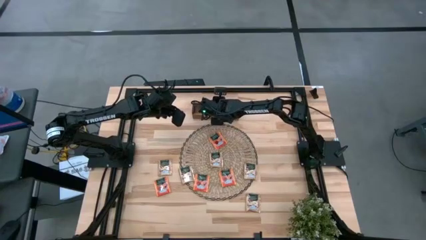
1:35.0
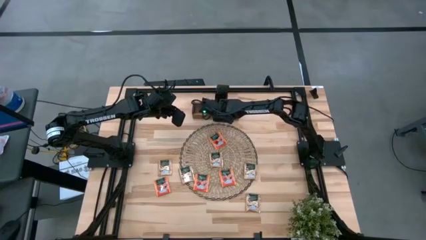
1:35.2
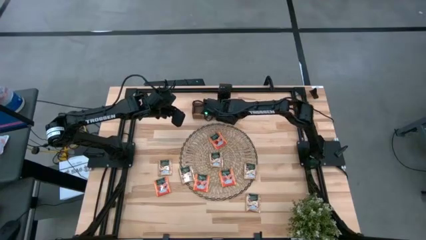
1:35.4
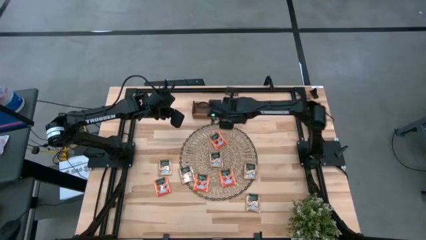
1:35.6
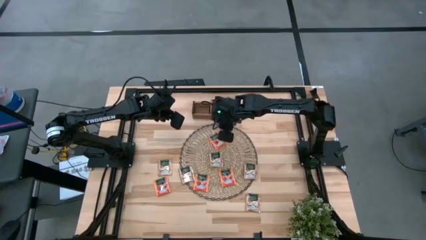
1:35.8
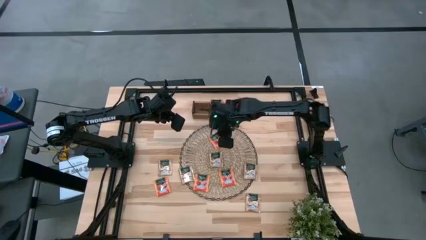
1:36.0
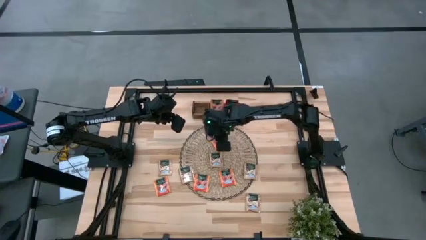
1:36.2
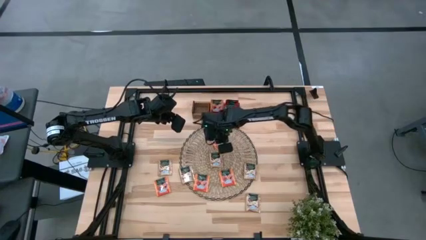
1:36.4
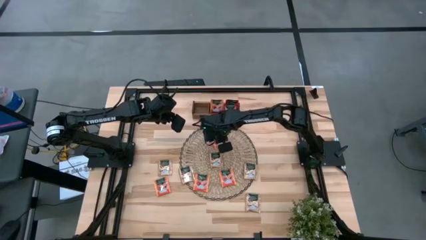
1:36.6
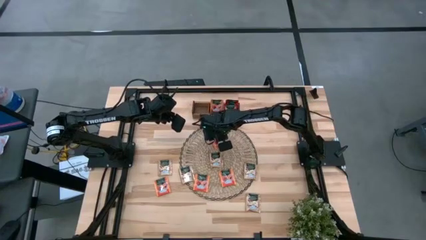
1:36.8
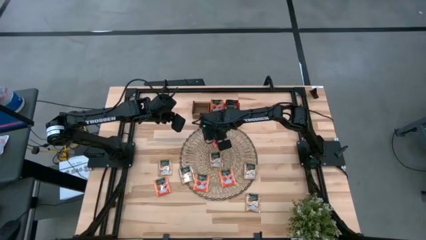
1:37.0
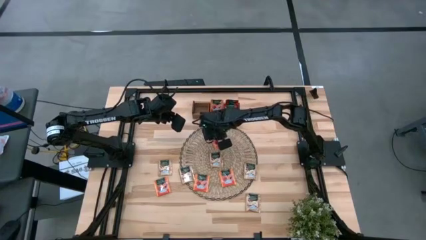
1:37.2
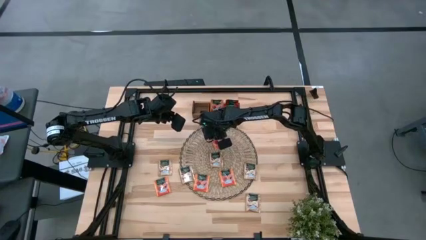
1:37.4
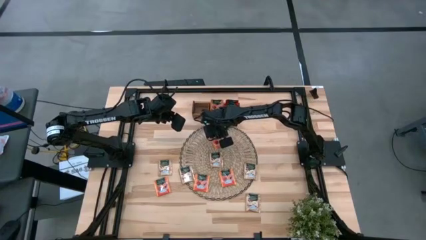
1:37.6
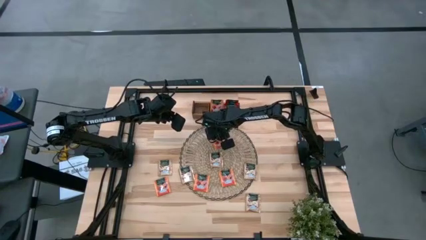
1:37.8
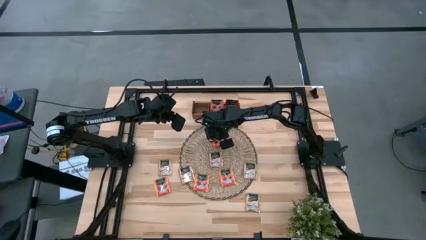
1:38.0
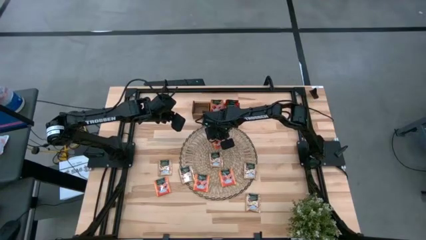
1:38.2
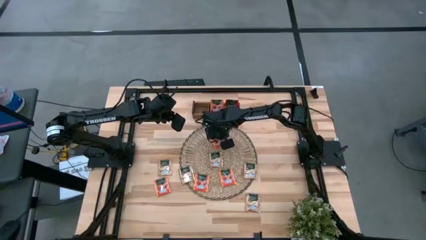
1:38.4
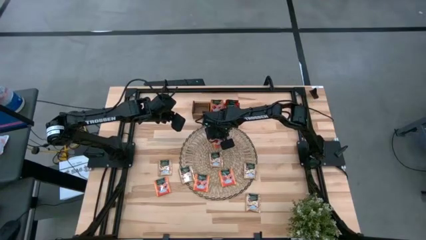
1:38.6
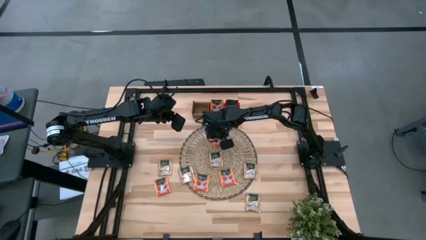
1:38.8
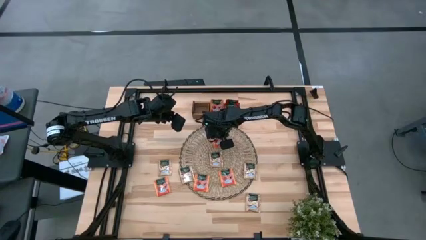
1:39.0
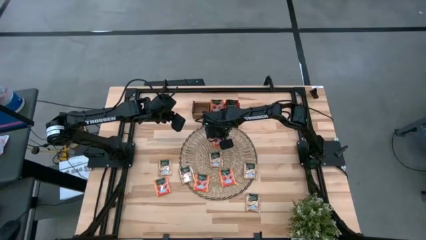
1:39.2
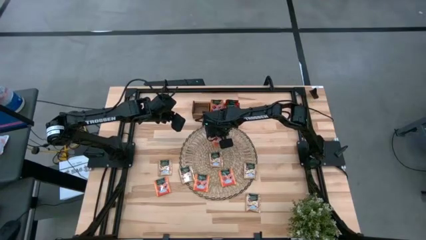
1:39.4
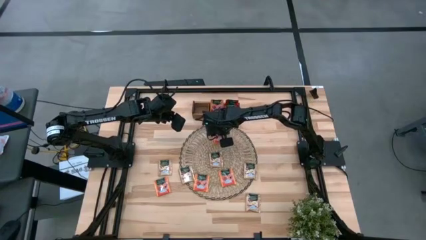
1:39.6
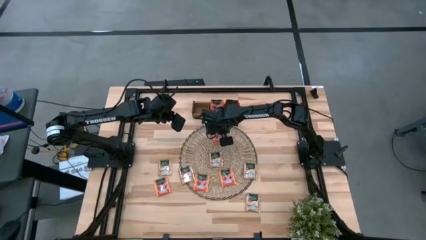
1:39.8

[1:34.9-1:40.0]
Task: Pick & Place Tea
Put the orange tea bag into the middle section of the wooden organizer

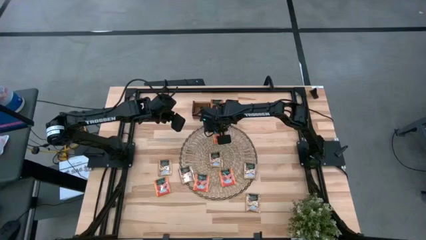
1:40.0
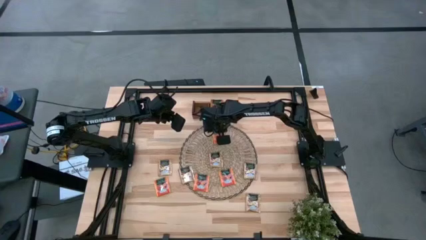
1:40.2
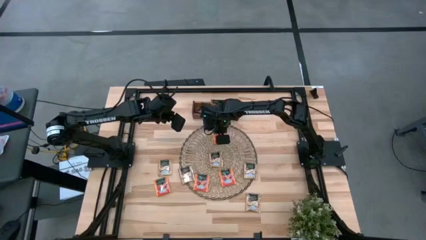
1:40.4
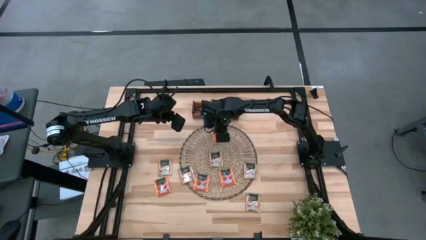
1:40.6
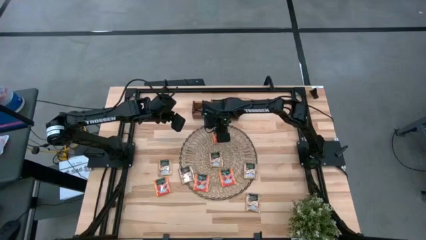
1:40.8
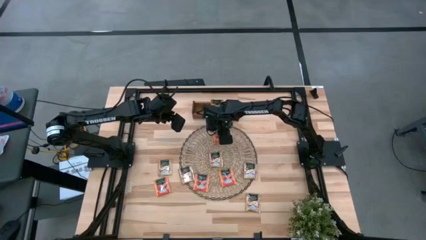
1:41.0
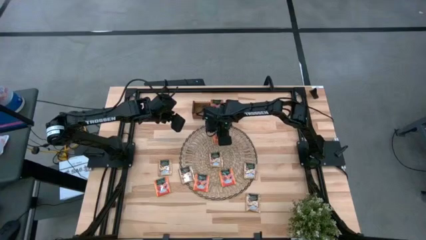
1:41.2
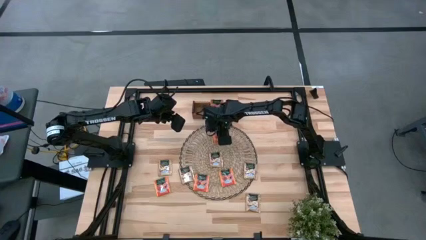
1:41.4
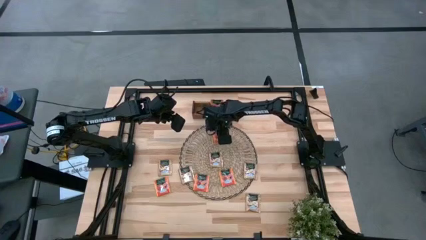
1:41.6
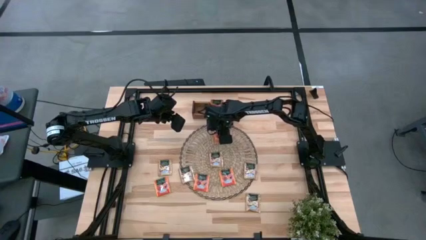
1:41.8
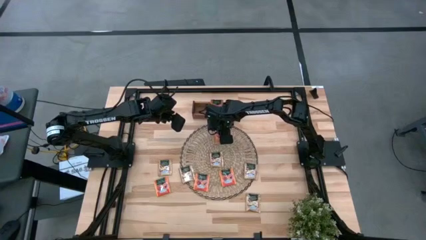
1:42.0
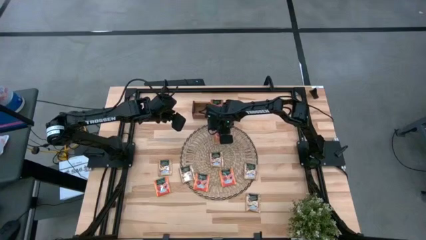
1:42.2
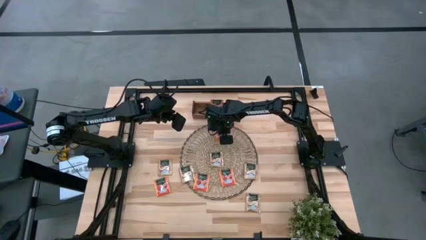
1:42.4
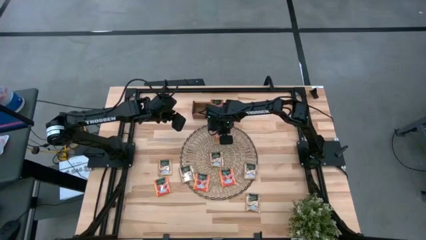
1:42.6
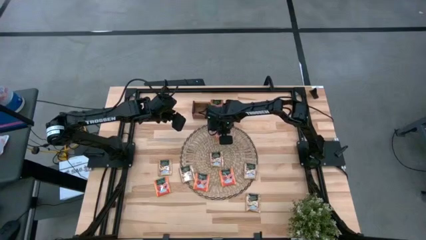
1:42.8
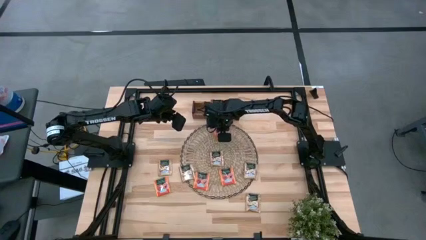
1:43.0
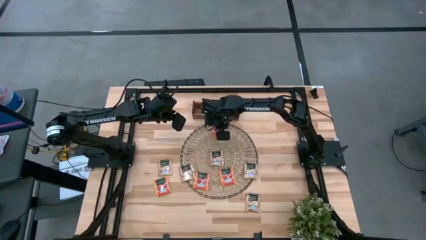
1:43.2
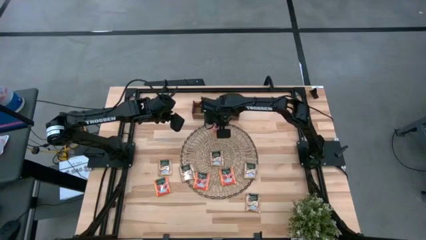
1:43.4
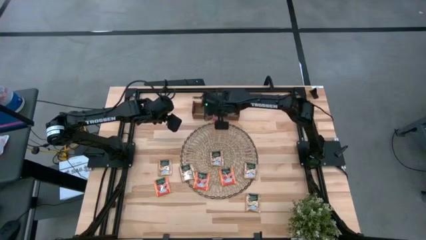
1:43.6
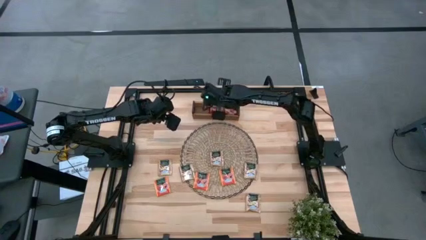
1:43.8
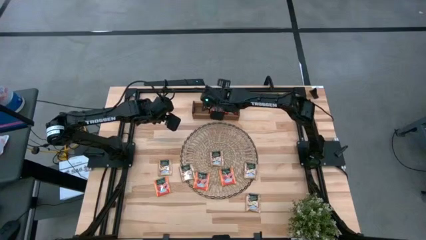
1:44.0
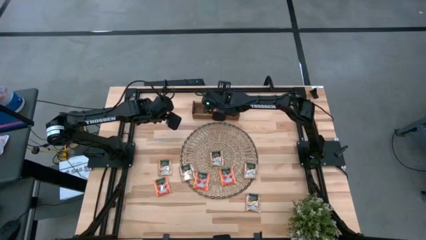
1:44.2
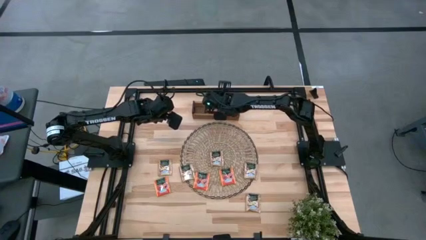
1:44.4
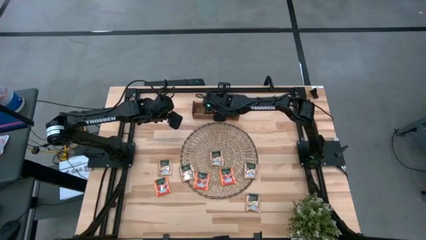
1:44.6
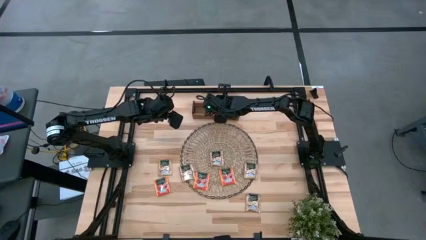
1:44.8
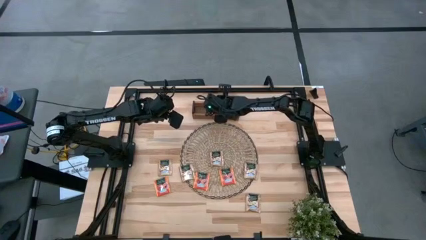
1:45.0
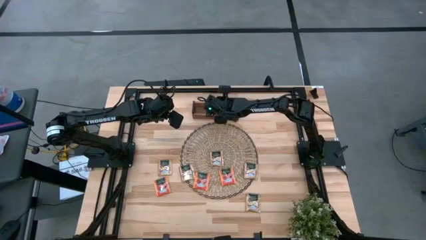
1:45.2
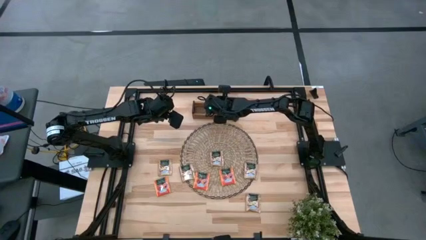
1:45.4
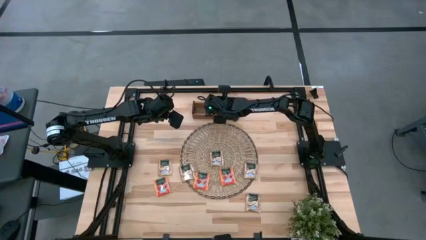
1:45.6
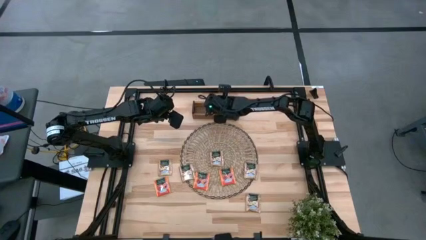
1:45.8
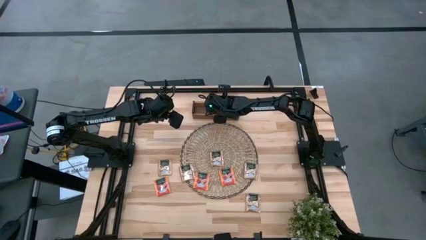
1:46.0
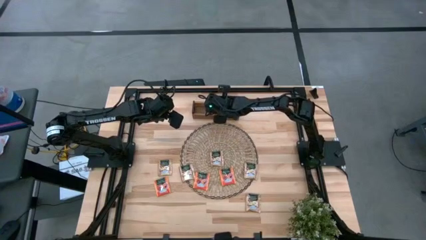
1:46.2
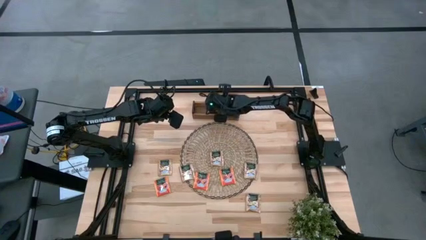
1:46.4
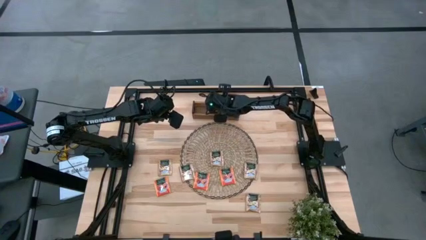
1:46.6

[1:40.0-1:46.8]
Put the orange tea bag into the middle section of the wooden organizer

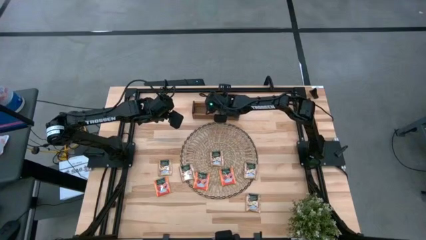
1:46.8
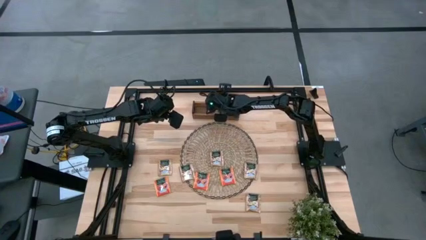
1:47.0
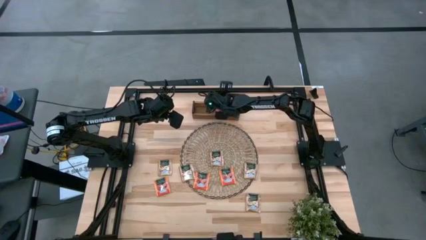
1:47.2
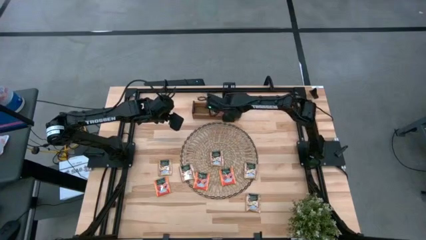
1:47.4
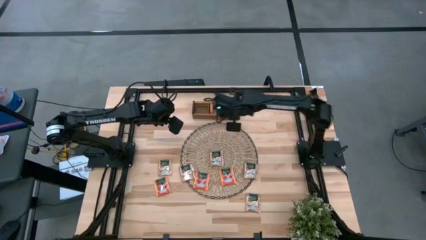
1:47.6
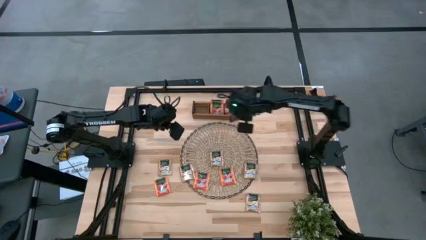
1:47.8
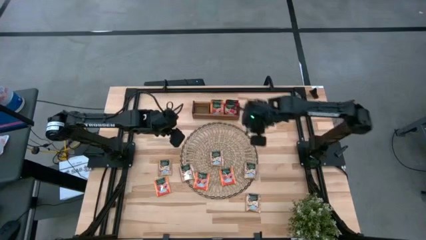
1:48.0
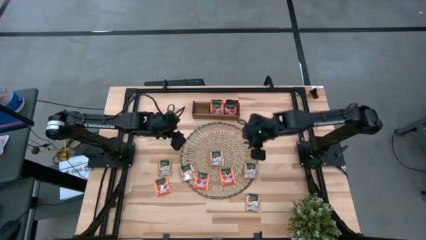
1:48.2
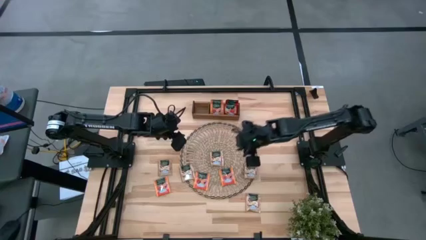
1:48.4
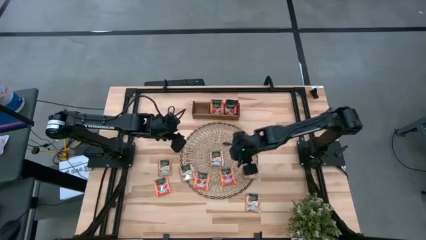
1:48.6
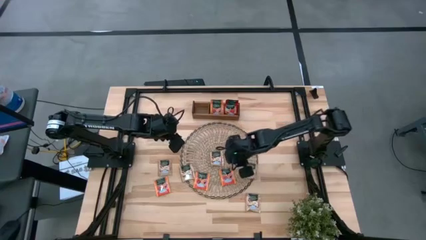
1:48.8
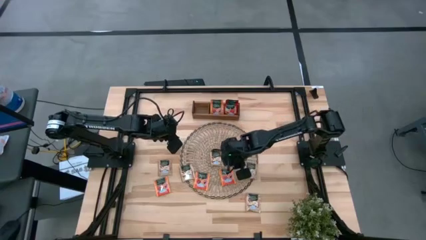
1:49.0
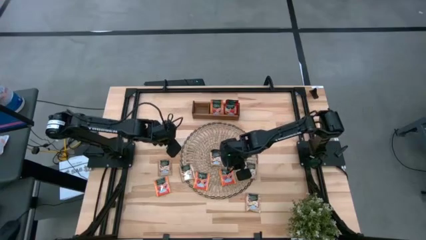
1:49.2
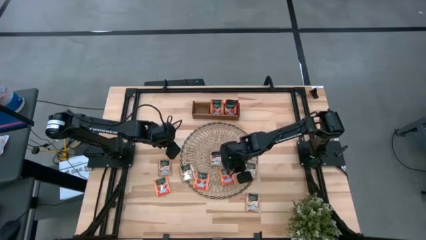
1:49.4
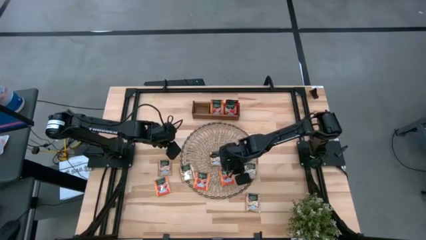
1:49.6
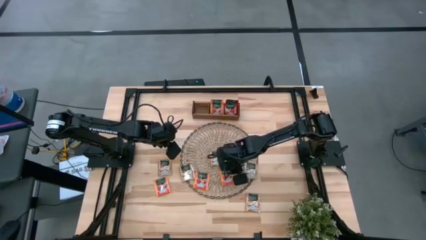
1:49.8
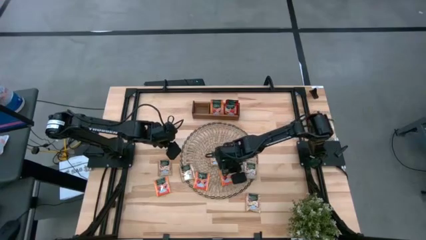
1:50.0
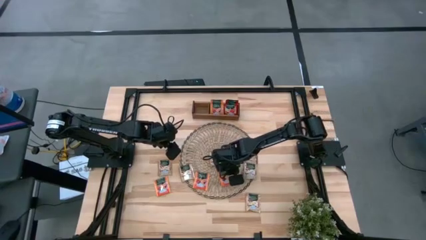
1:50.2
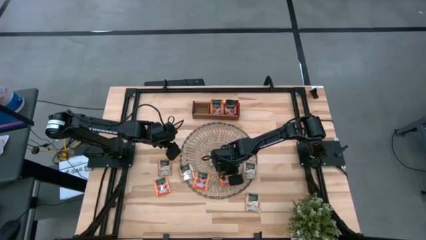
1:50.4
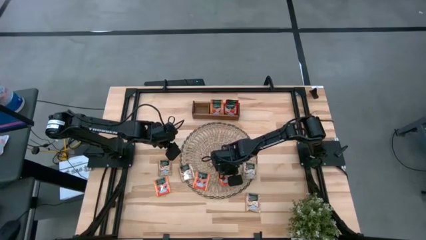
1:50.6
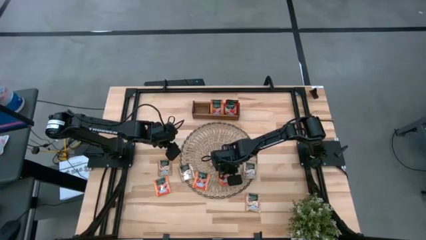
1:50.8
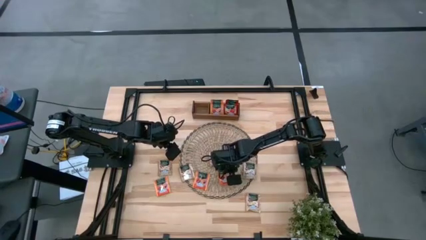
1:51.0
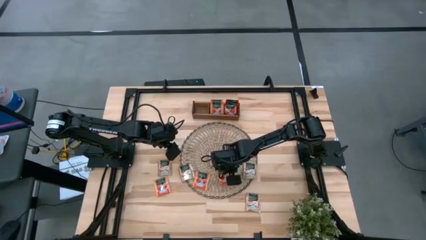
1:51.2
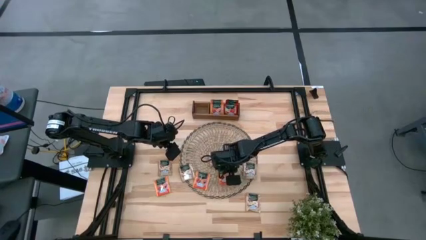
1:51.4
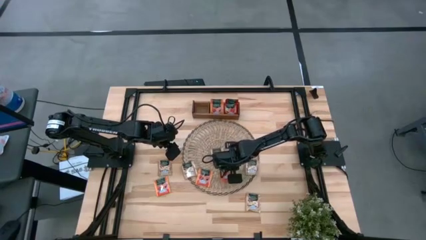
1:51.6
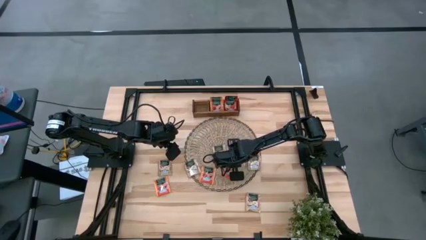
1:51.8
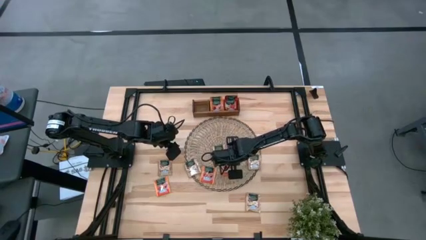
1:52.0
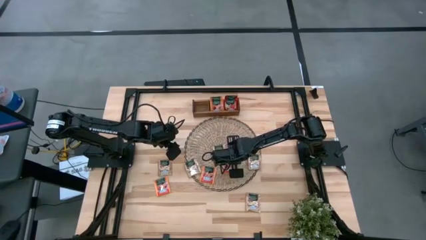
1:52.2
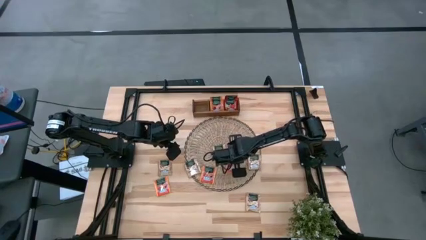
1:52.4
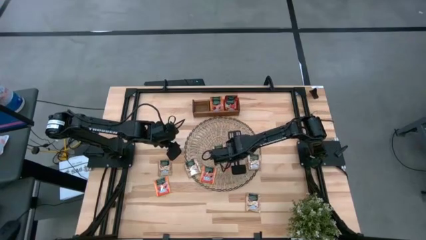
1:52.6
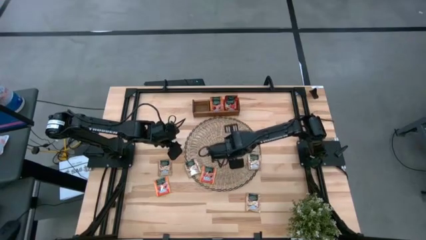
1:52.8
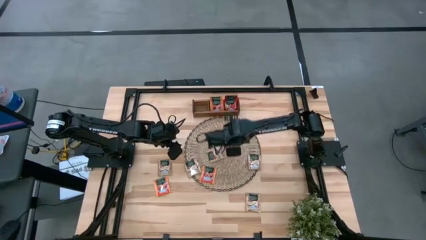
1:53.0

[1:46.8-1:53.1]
Put the orange tea bag into the middle section of the wooden organizer
